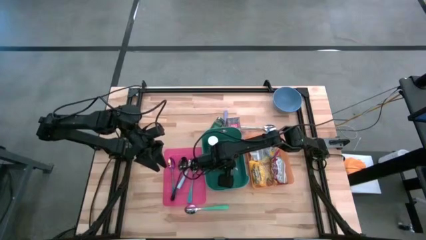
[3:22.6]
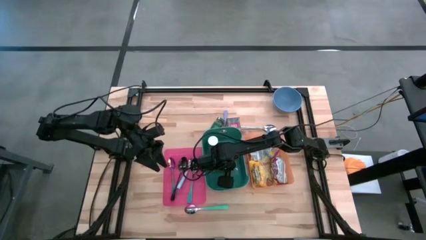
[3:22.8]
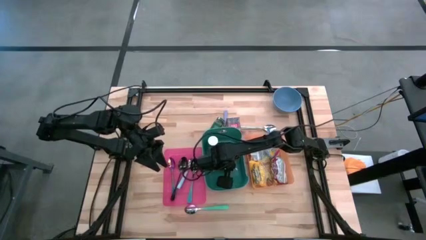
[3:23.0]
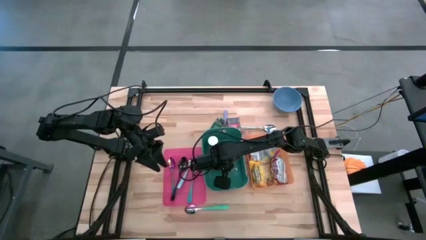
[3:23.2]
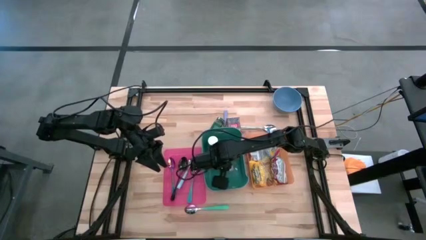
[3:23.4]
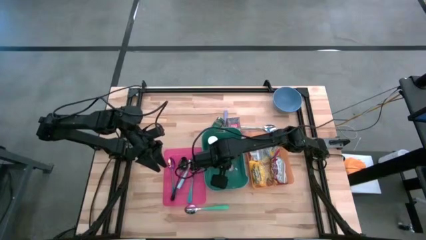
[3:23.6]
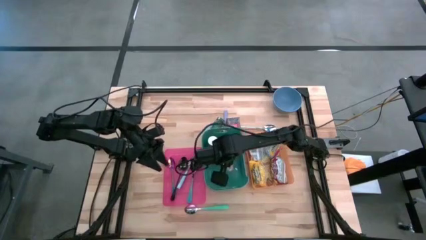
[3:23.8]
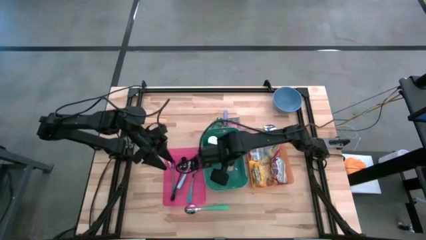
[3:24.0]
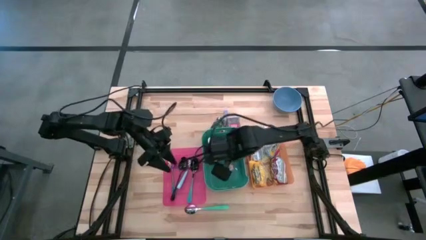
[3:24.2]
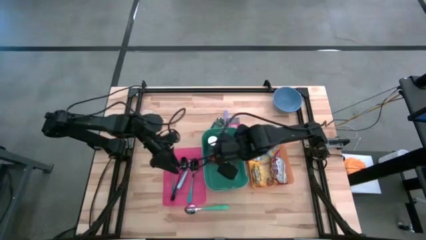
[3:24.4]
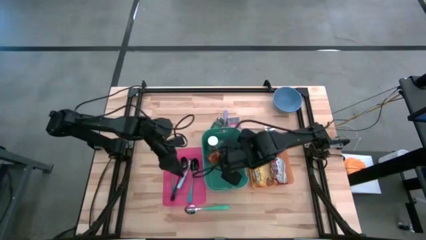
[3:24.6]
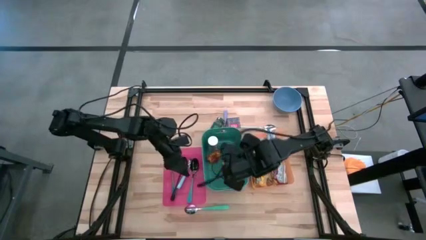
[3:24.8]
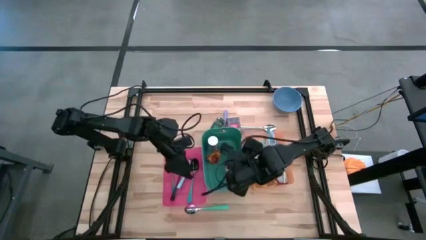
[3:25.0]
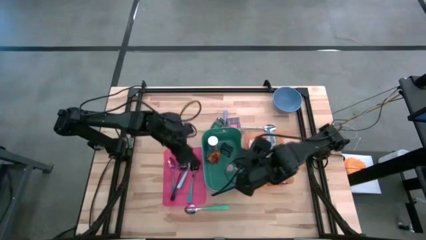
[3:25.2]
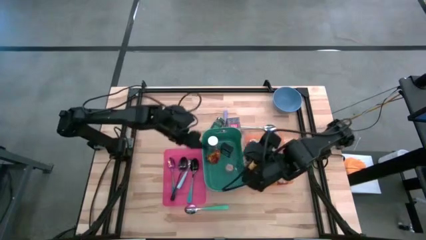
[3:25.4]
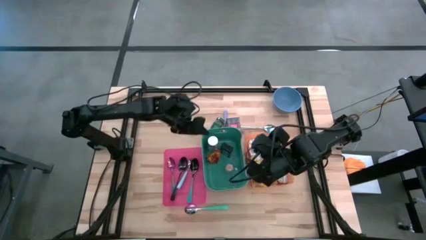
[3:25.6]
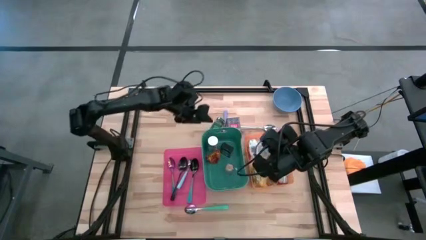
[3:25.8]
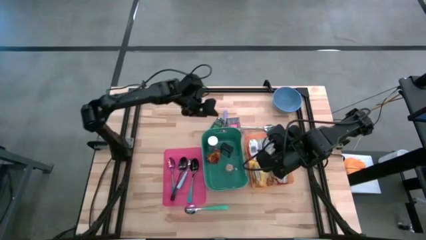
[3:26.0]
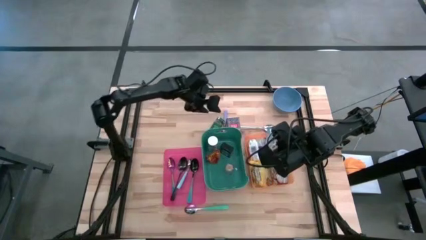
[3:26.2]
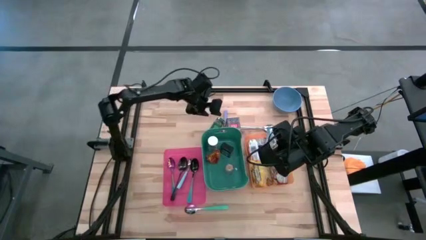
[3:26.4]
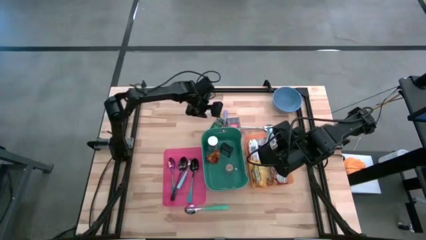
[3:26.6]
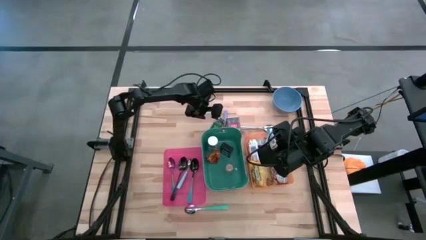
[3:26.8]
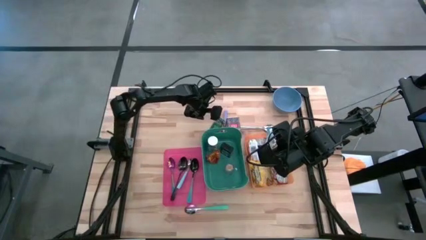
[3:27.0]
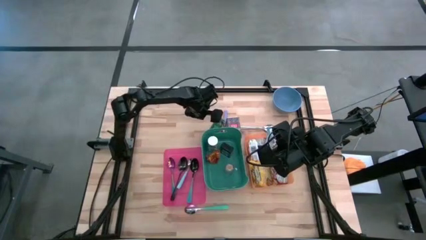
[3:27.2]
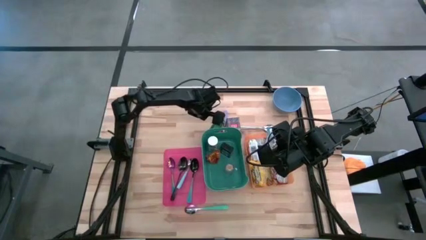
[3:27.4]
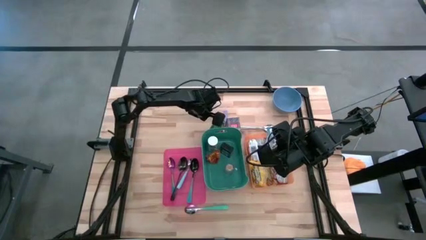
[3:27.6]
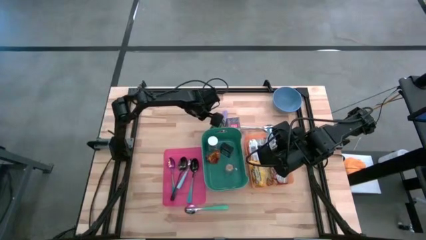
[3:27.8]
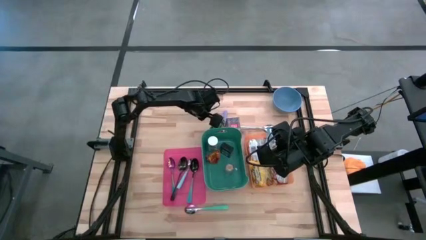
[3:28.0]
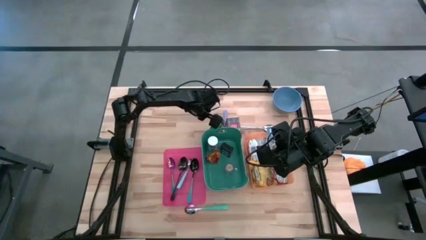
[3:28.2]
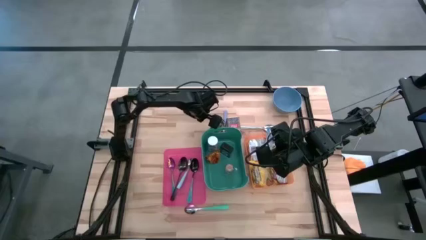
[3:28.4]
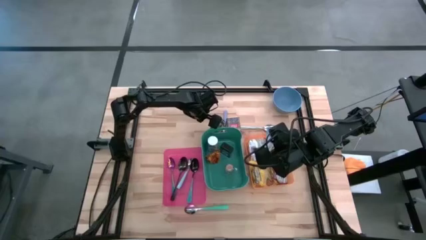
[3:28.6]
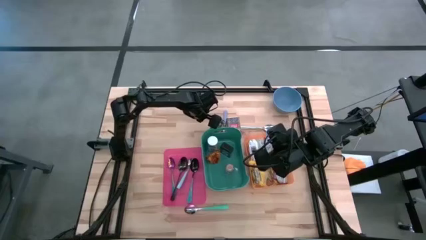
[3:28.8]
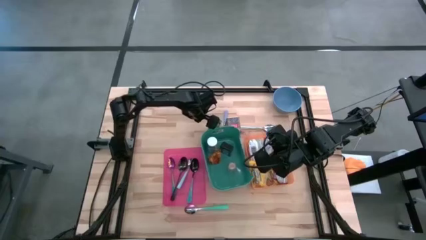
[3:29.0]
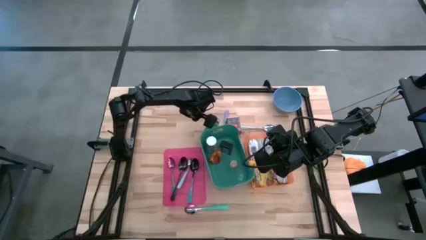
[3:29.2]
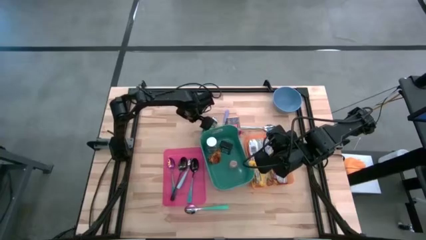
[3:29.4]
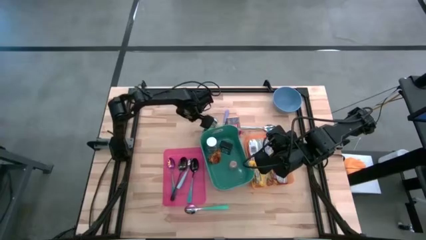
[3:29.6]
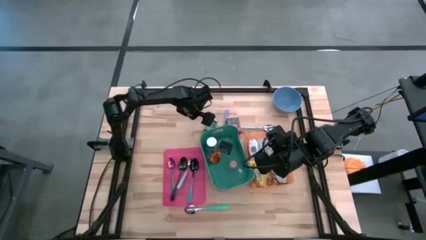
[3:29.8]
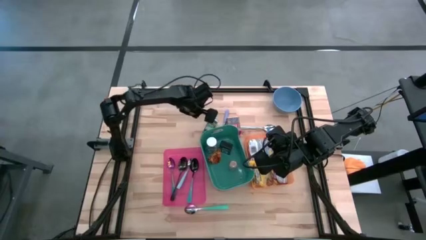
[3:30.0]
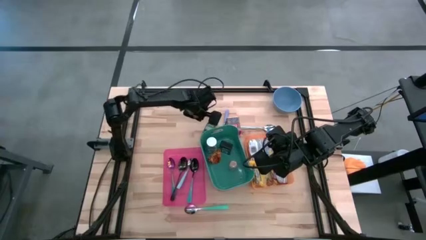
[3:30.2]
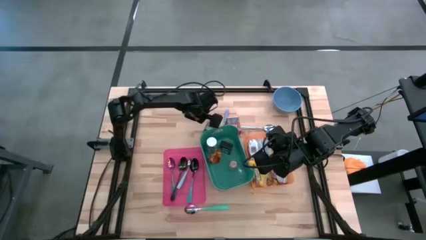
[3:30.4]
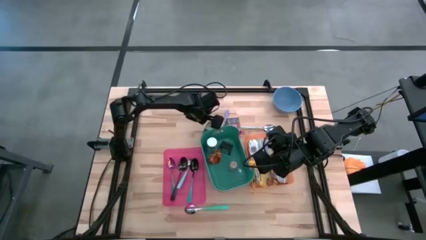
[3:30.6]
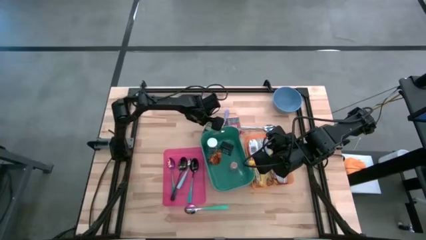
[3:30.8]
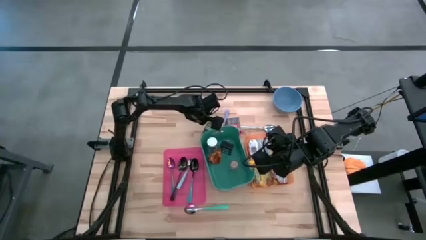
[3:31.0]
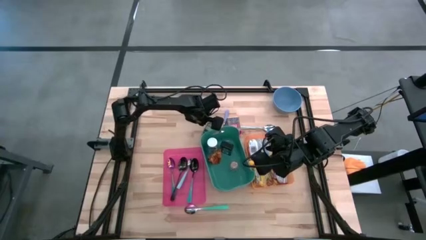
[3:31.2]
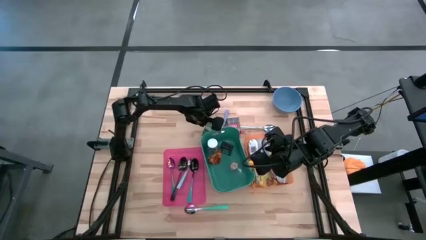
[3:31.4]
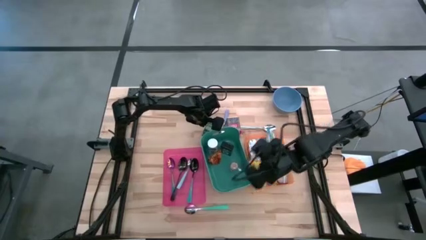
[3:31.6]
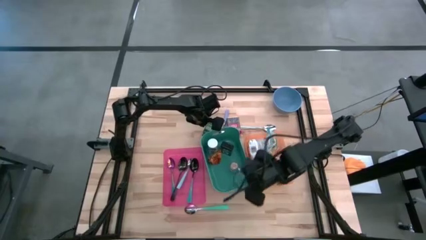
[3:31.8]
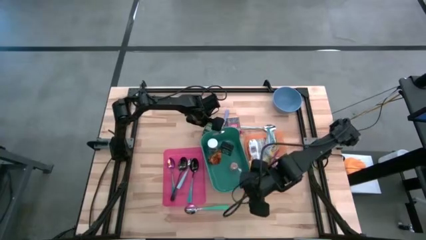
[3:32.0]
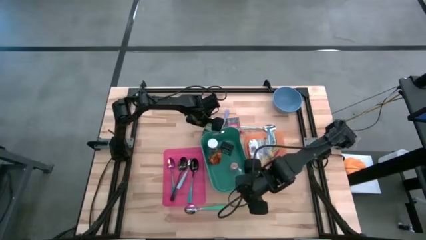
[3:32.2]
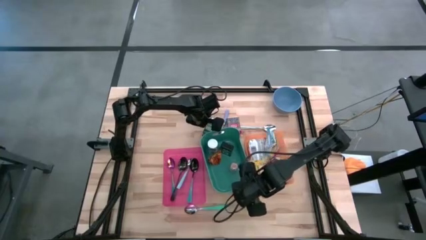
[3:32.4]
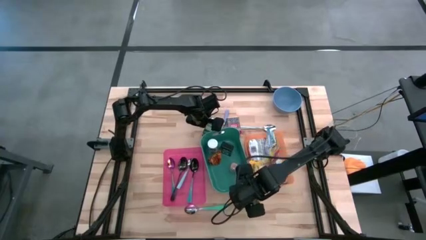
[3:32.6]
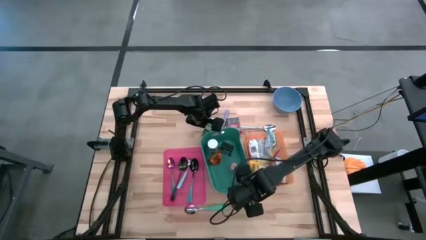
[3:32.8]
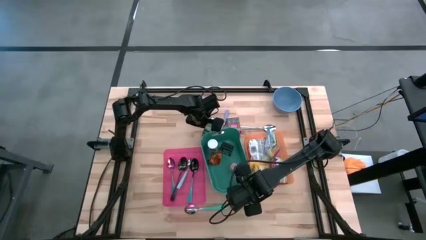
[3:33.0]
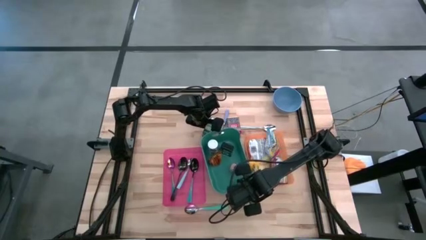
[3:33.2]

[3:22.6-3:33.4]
Put the green seasoning bottle into the green bin
